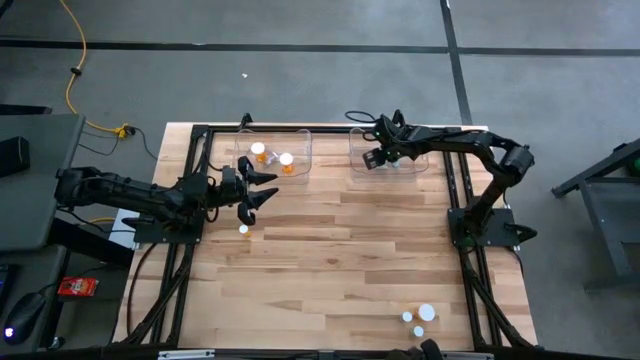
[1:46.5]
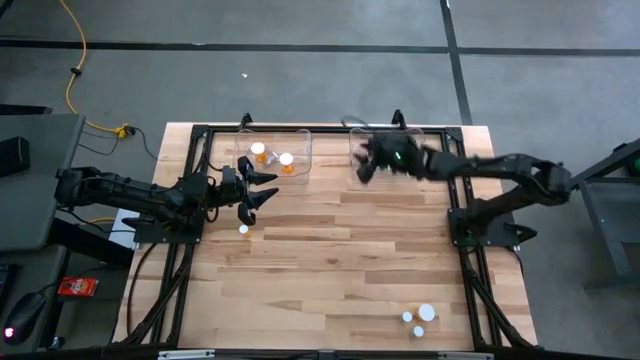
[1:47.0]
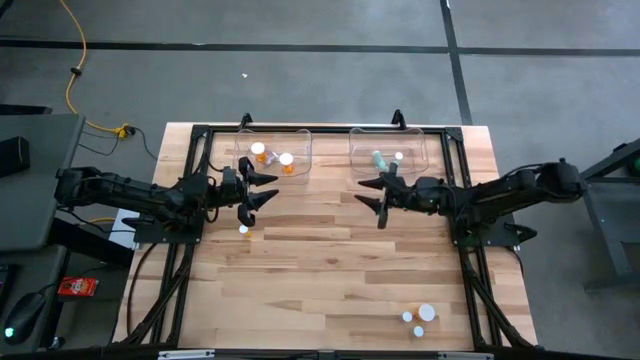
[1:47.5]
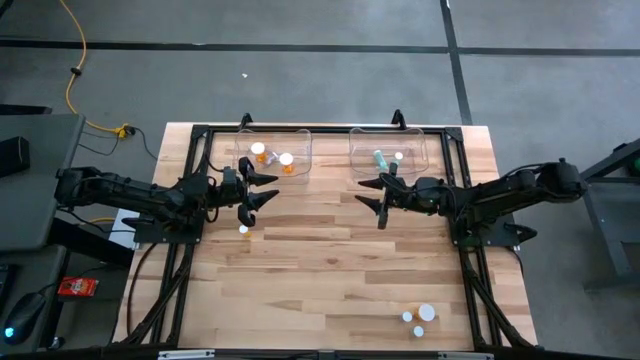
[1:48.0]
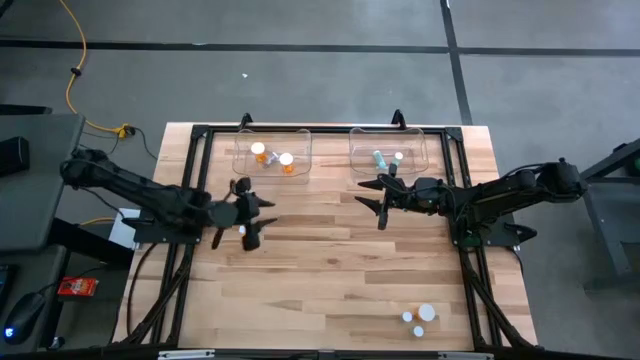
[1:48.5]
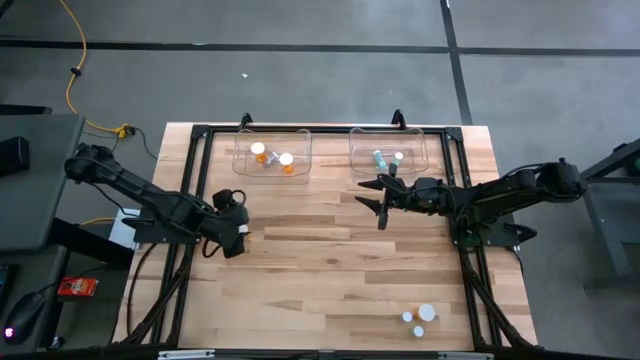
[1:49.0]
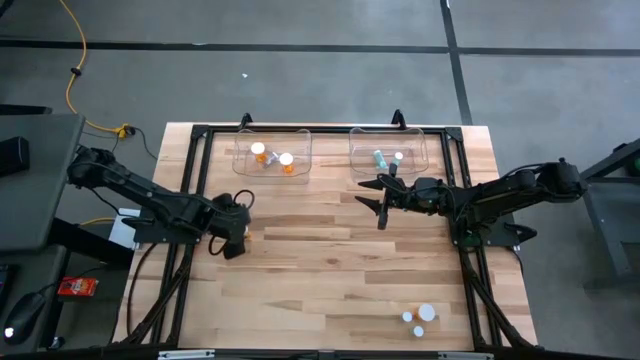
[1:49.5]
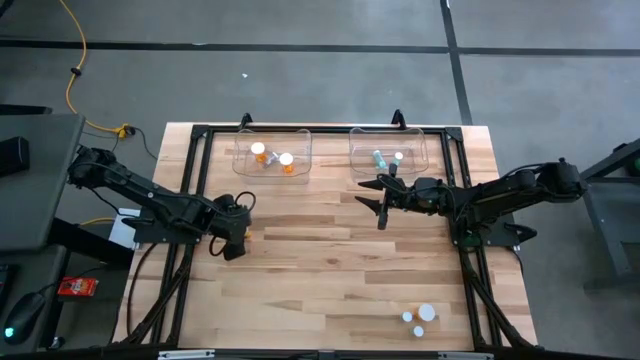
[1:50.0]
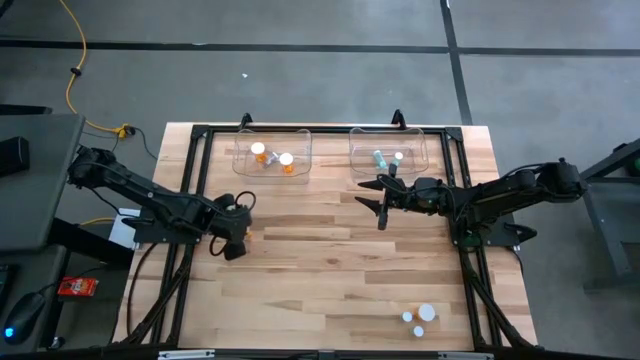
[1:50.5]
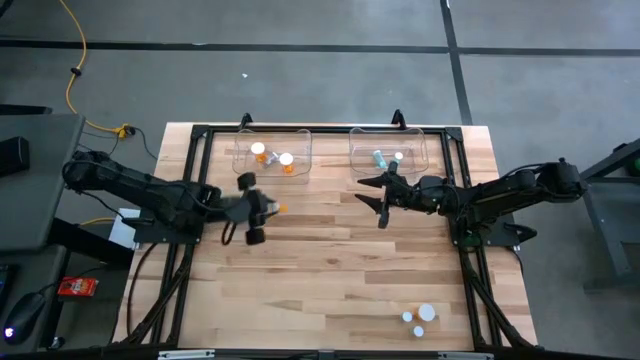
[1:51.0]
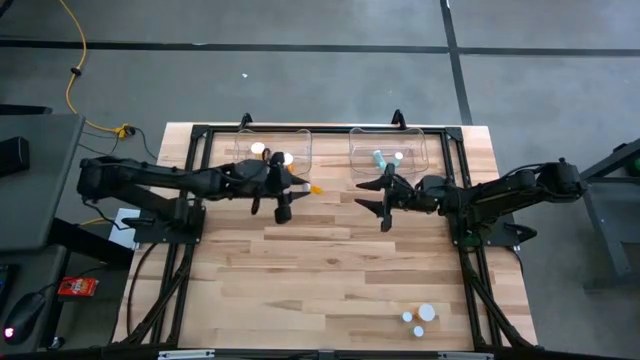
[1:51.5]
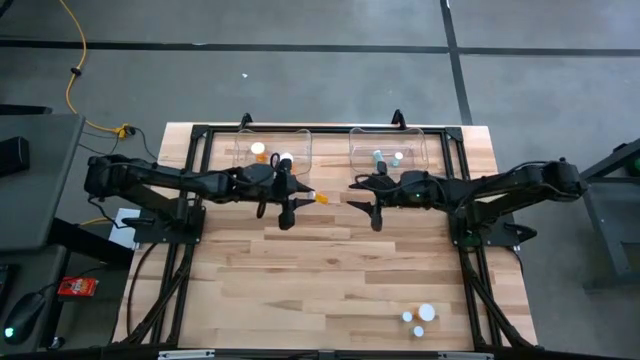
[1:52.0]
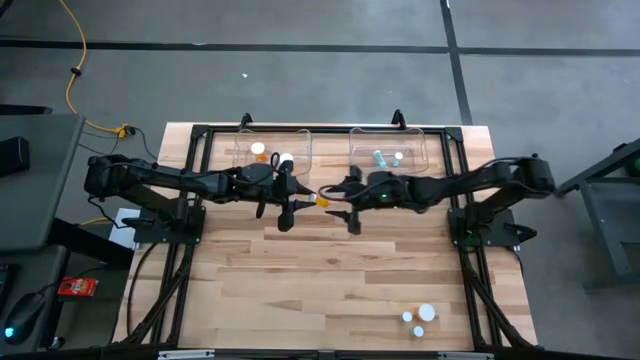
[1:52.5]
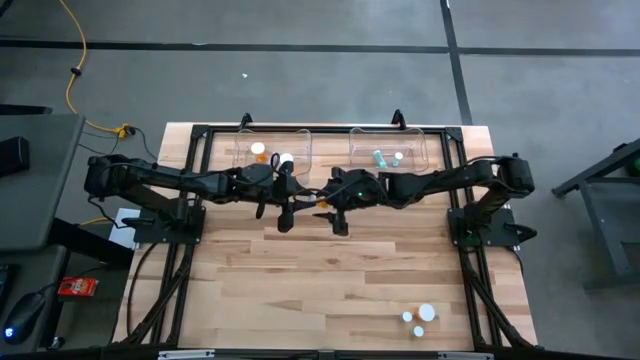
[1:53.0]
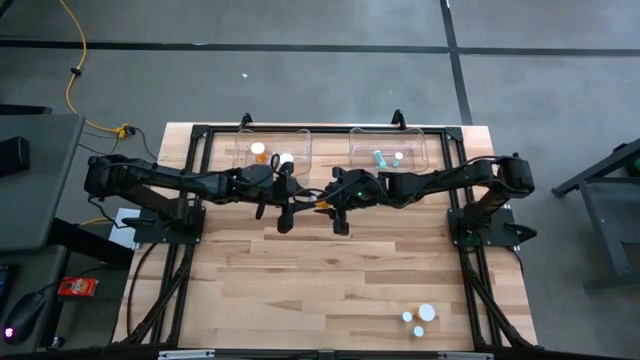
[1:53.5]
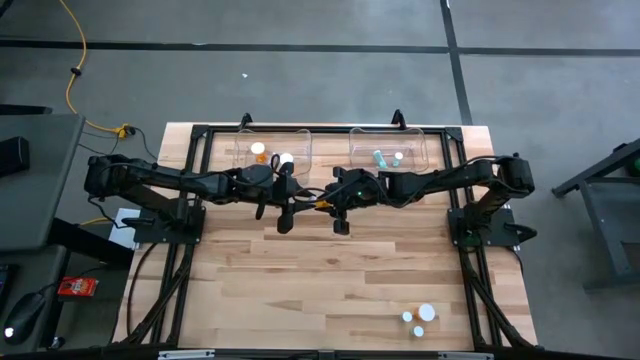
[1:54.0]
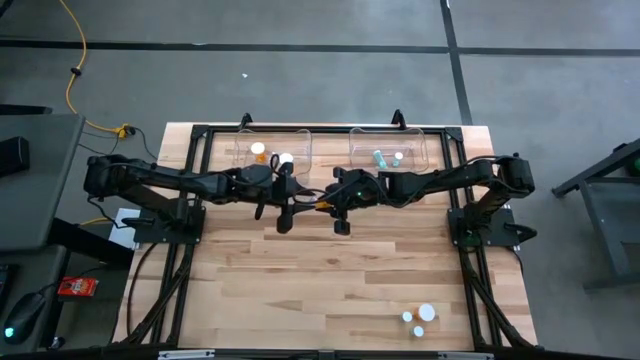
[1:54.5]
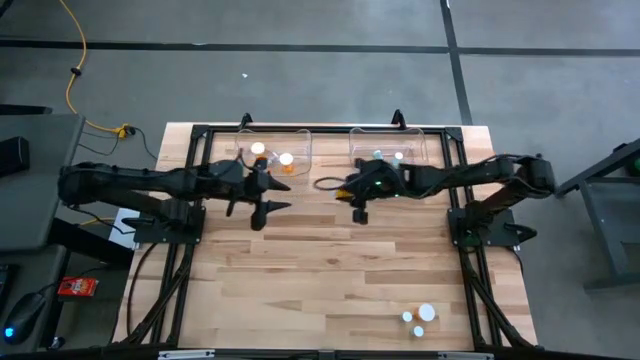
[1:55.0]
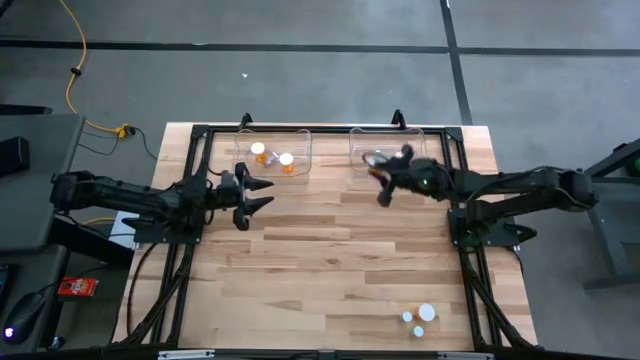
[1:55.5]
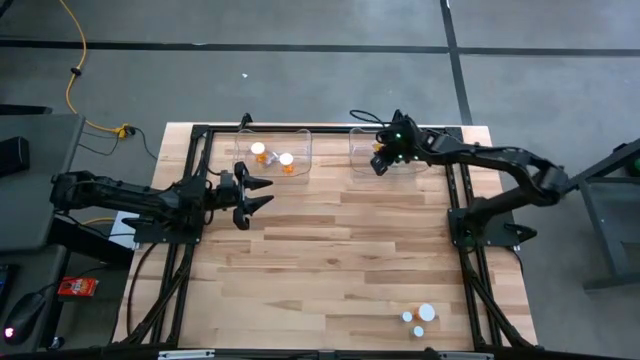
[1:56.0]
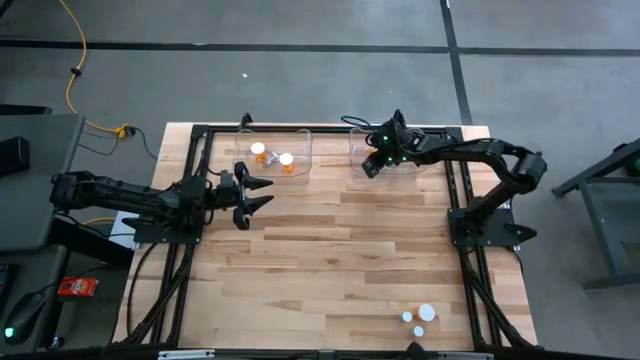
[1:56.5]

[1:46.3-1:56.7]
Task: Pick and place medicine bottles into bin by pill shape (circle, oval)
Put the orange tablet bottle into the right transparent bin

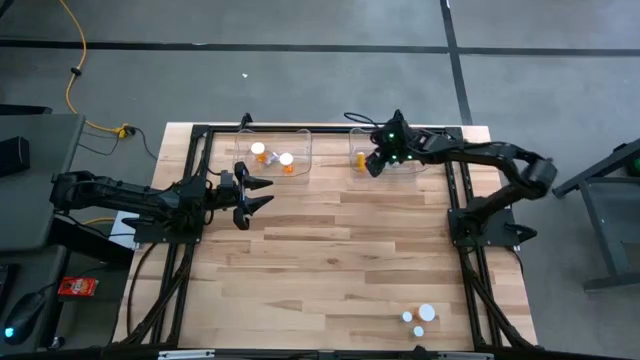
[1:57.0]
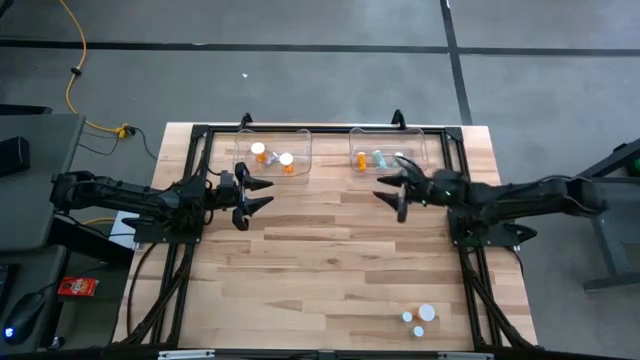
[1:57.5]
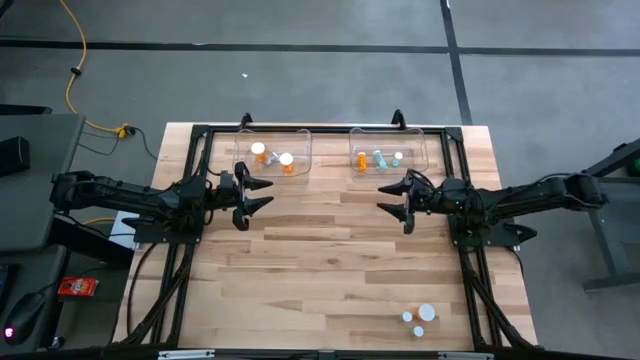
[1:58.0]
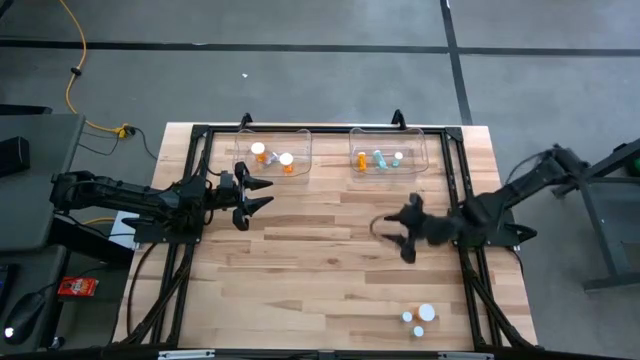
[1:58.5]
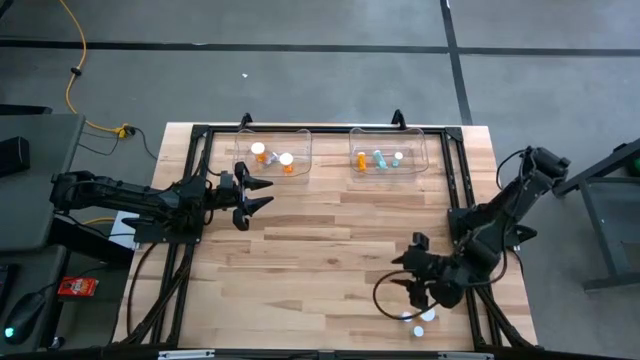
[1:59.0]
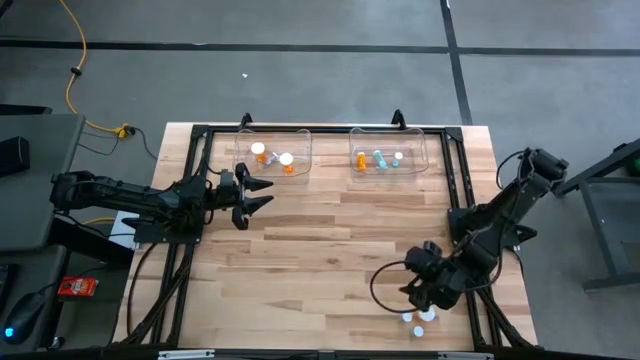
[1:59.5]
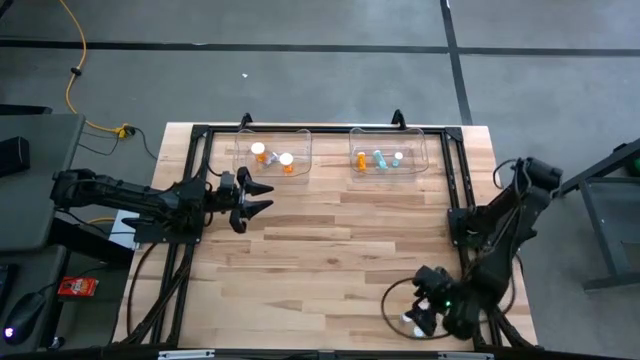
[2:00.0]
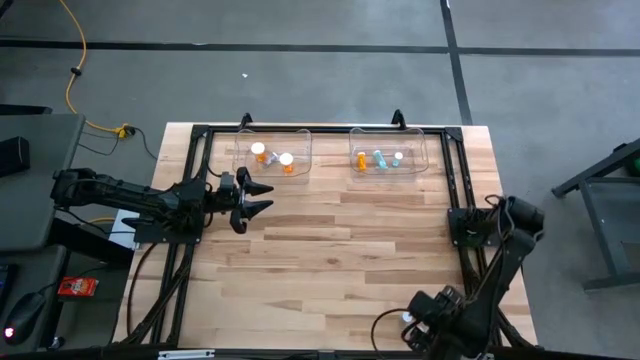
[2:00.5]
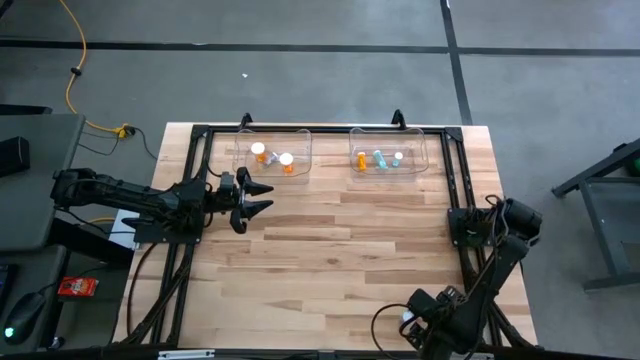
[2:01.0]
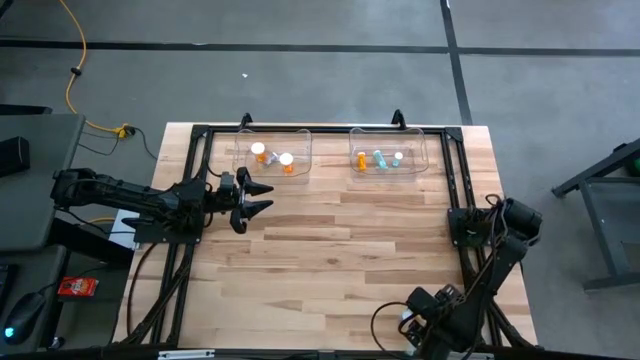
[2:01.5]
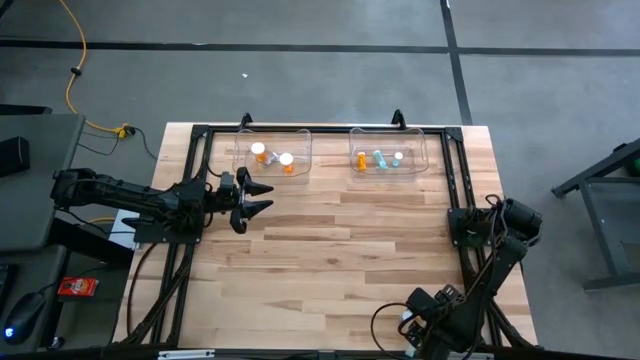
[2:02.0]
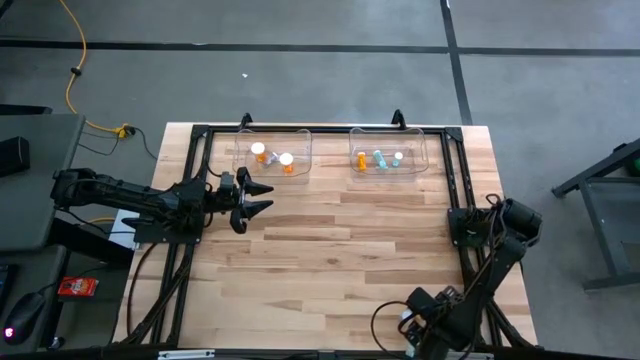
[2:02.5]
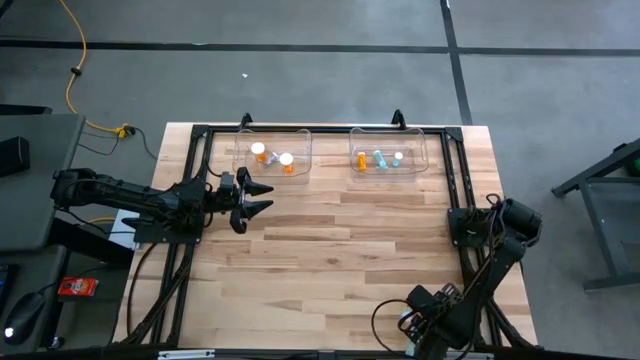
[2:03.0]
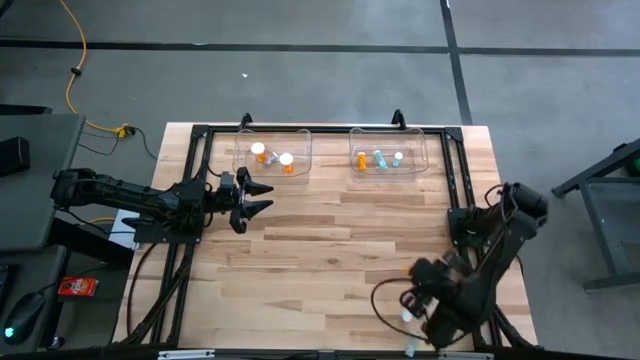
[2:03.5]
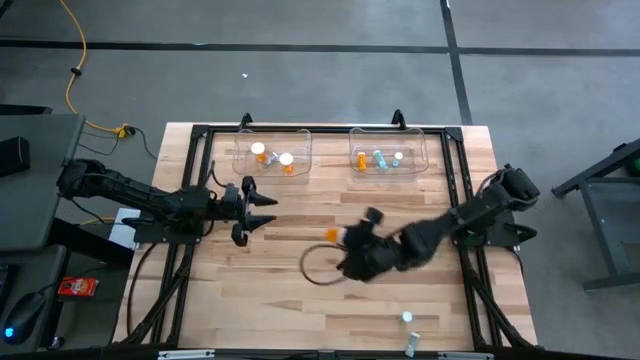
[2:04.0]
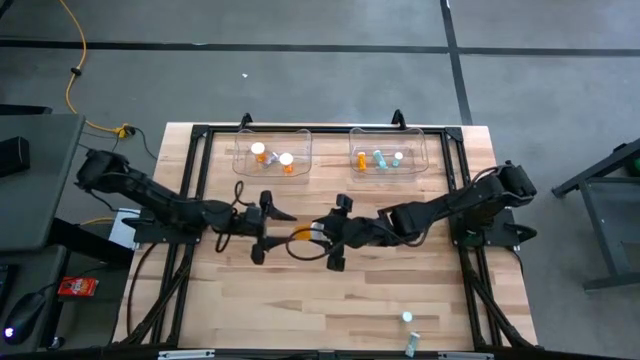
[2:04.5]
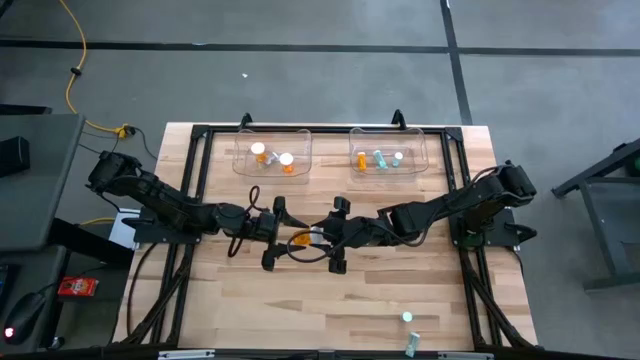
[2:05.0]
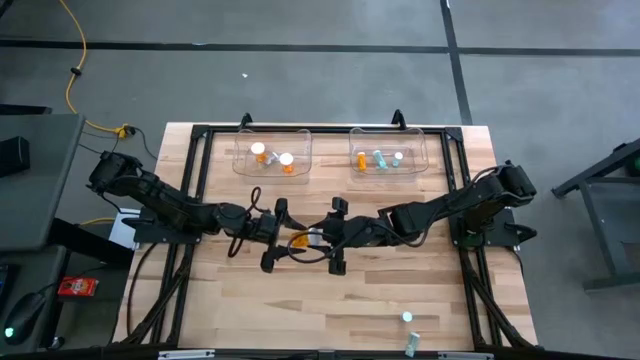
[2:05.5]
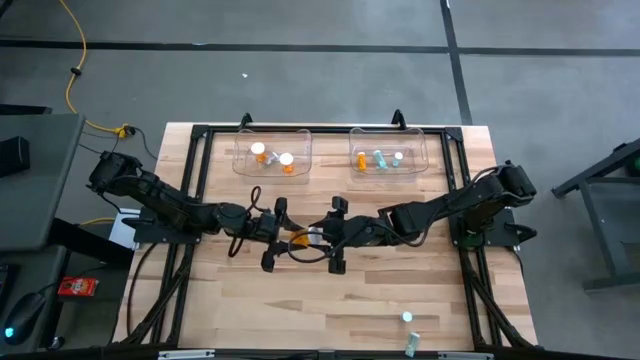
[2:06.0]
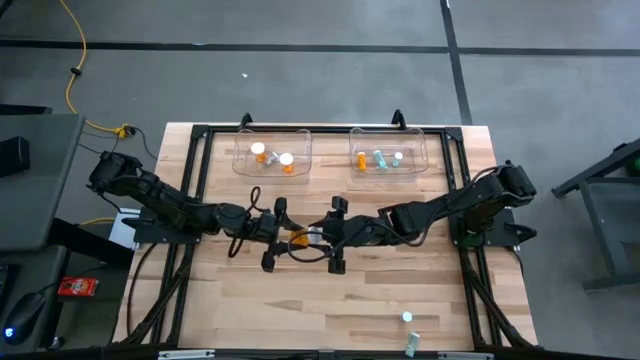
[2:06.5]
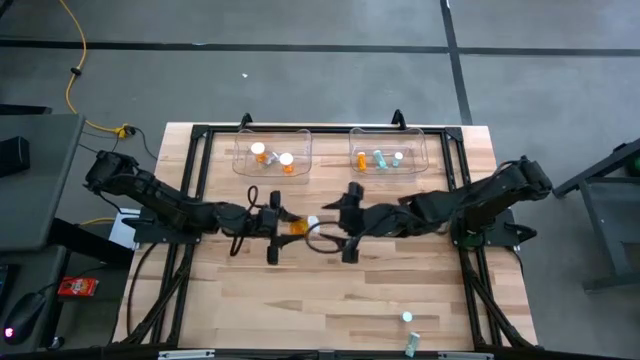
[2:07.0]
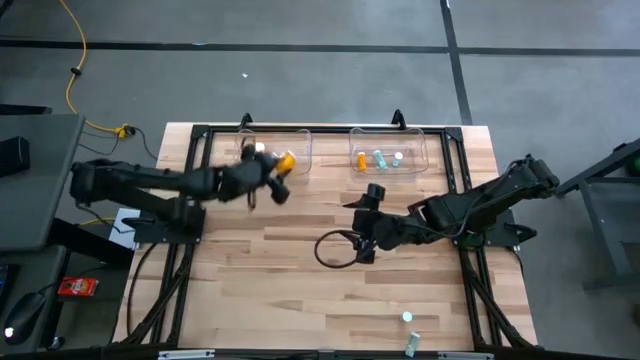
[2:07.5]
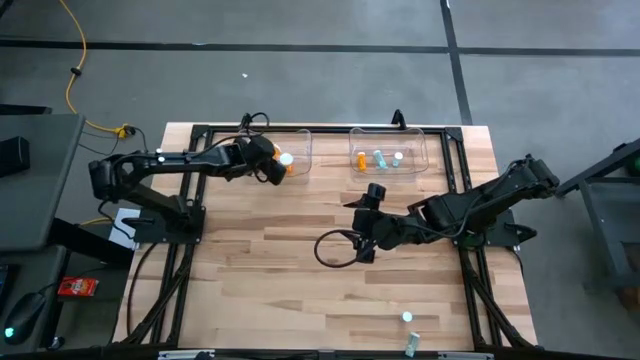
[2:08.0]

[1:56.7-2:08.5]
Put the orange capsule bottle into the left transparent bin
